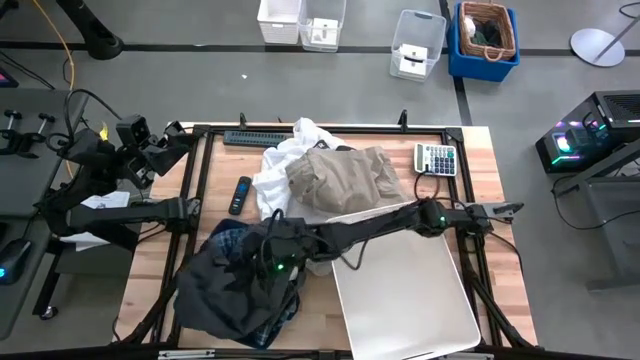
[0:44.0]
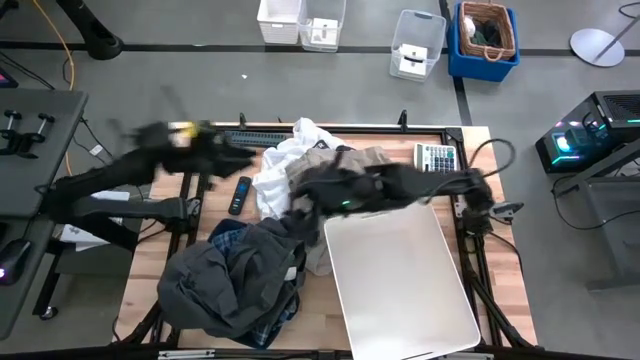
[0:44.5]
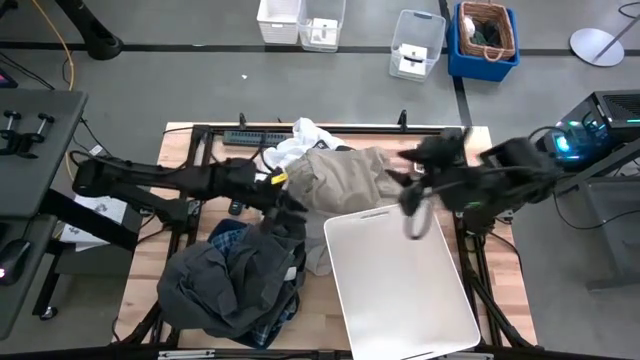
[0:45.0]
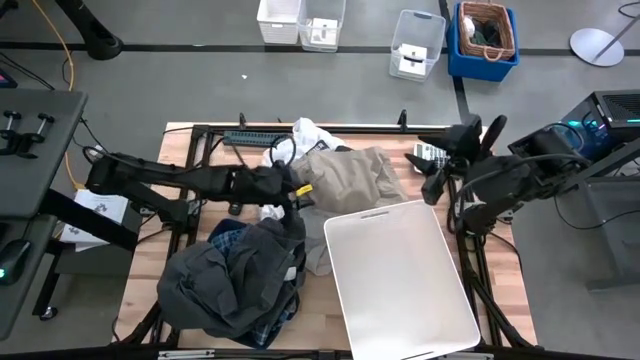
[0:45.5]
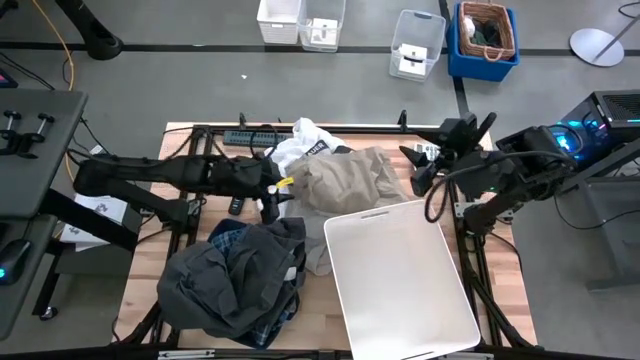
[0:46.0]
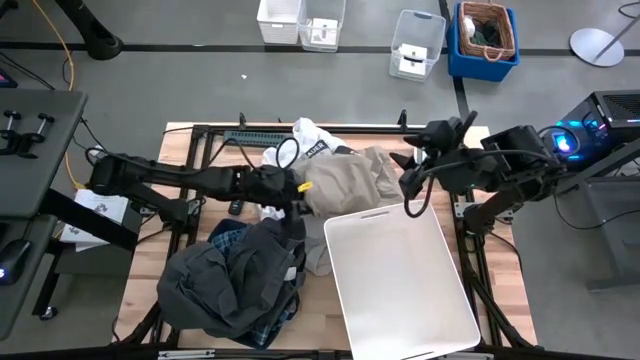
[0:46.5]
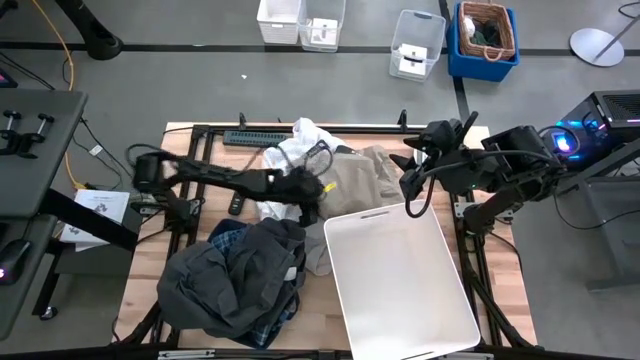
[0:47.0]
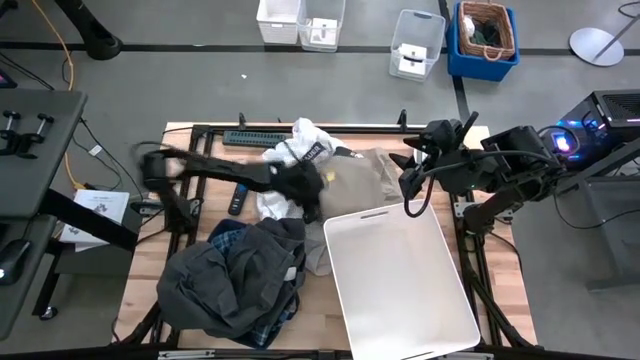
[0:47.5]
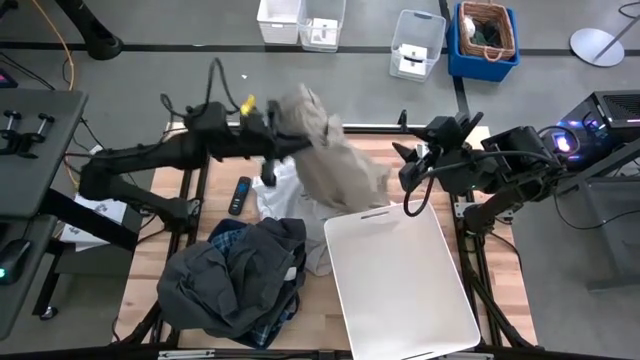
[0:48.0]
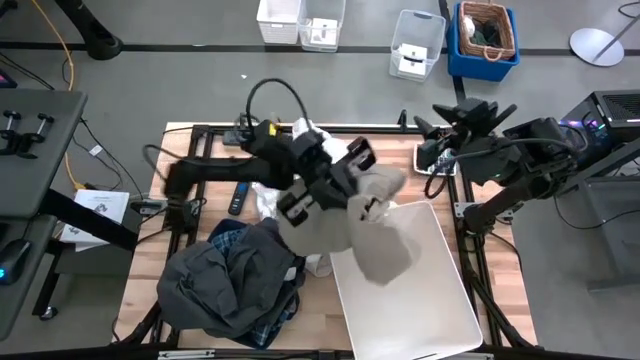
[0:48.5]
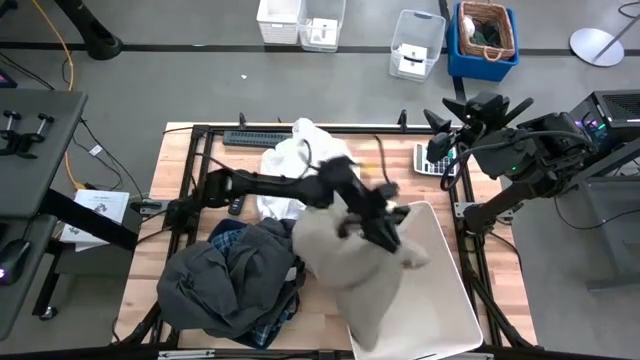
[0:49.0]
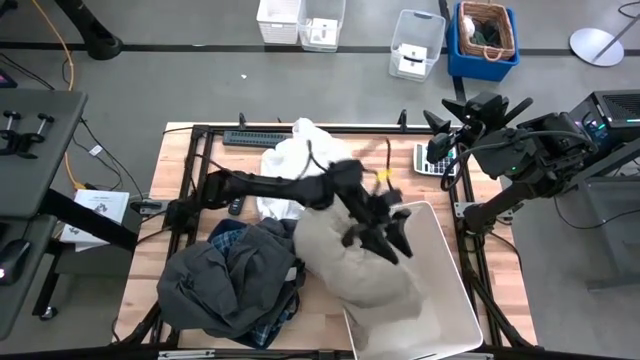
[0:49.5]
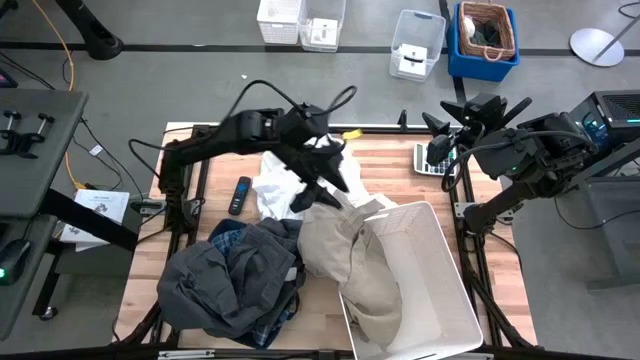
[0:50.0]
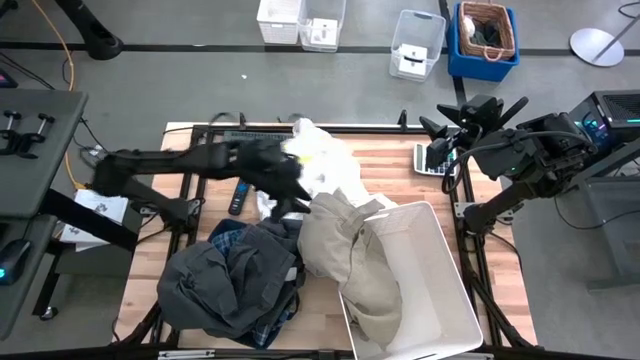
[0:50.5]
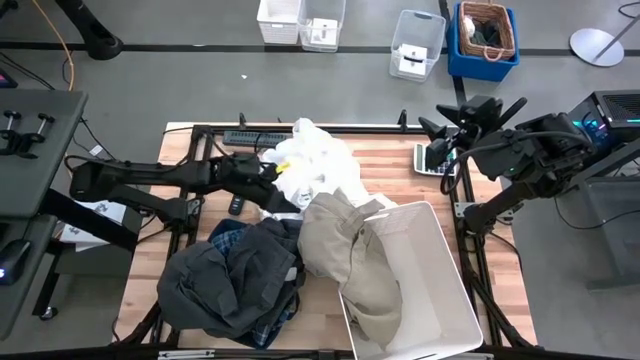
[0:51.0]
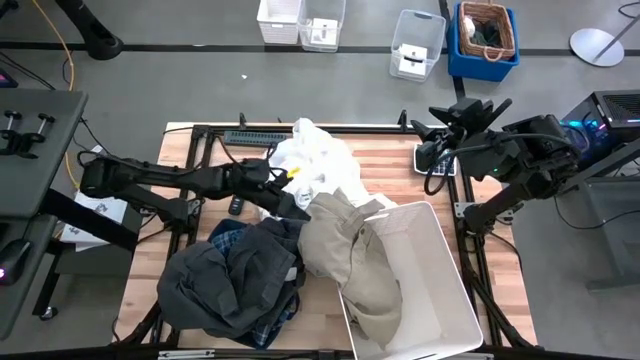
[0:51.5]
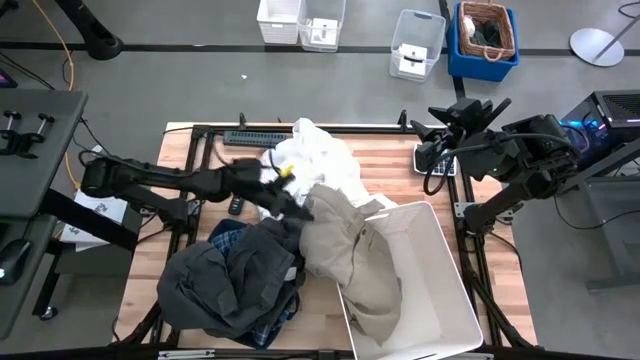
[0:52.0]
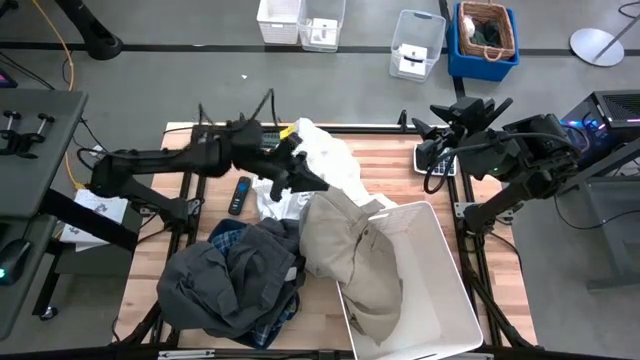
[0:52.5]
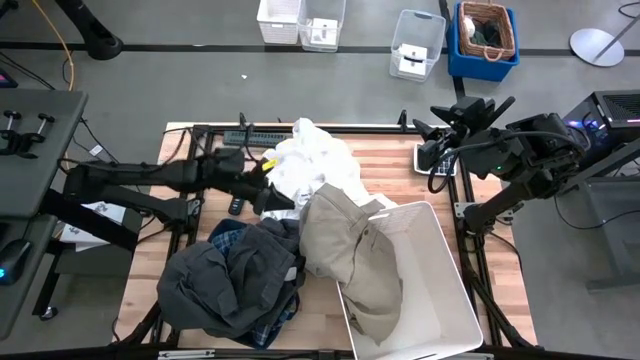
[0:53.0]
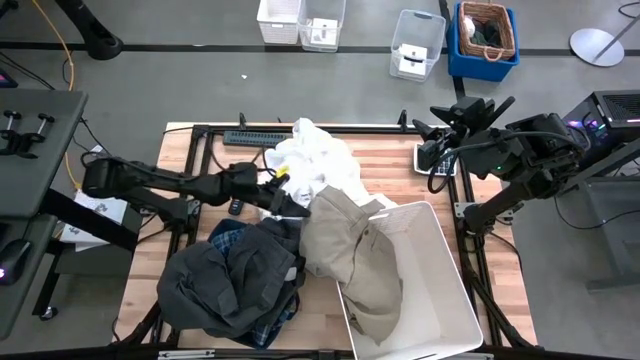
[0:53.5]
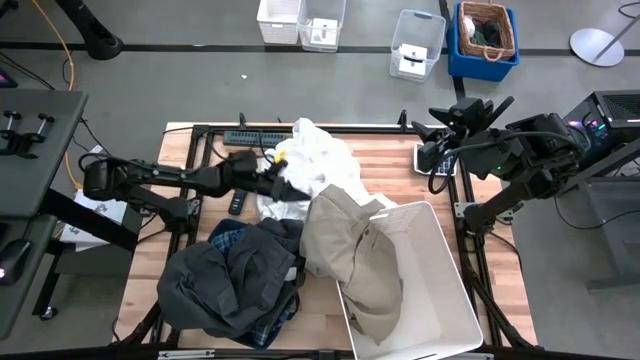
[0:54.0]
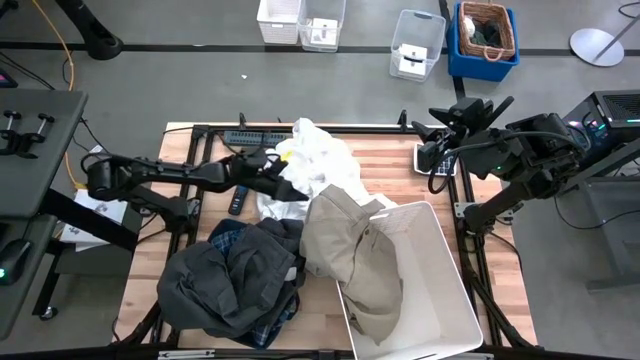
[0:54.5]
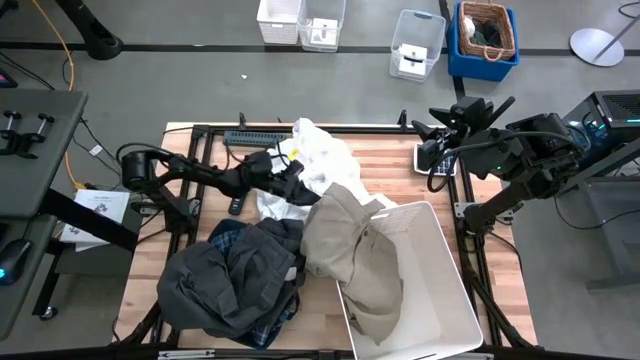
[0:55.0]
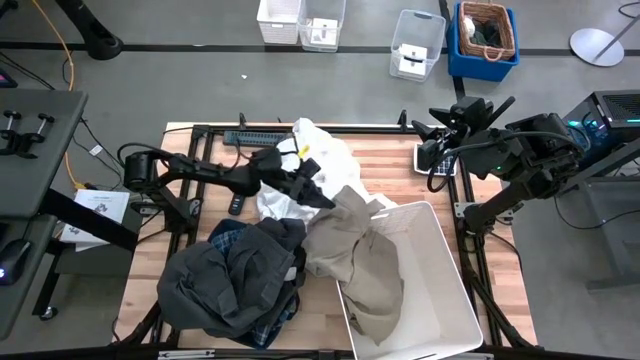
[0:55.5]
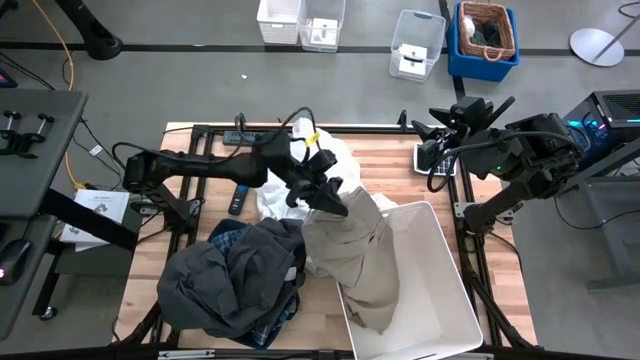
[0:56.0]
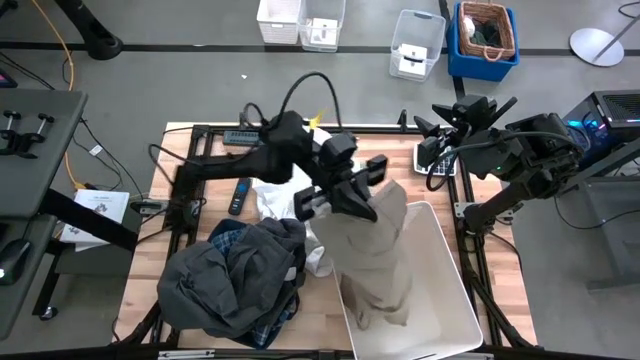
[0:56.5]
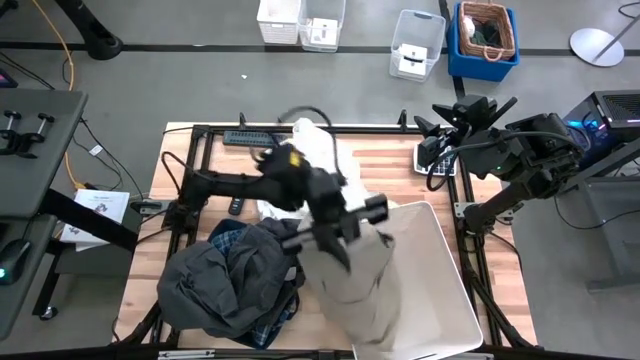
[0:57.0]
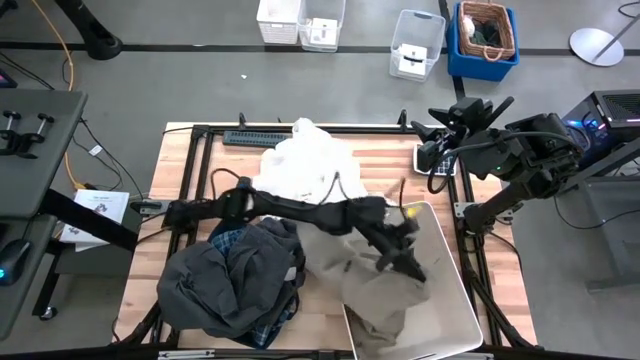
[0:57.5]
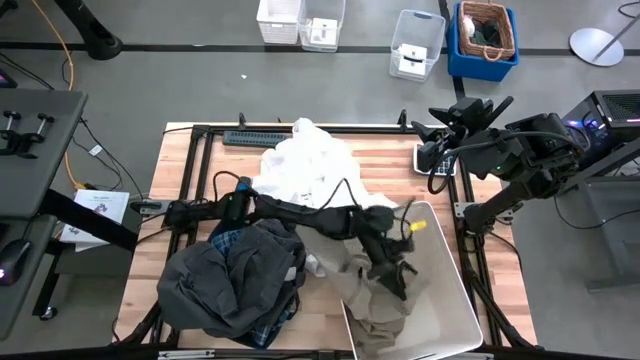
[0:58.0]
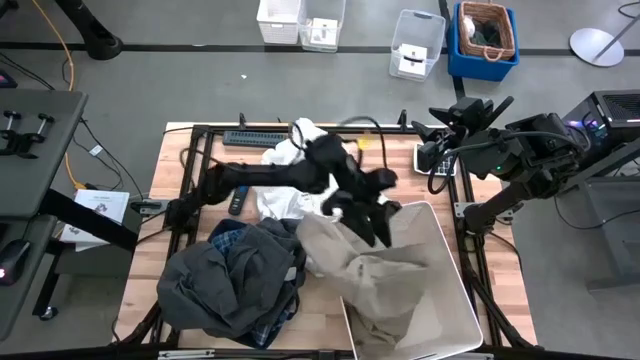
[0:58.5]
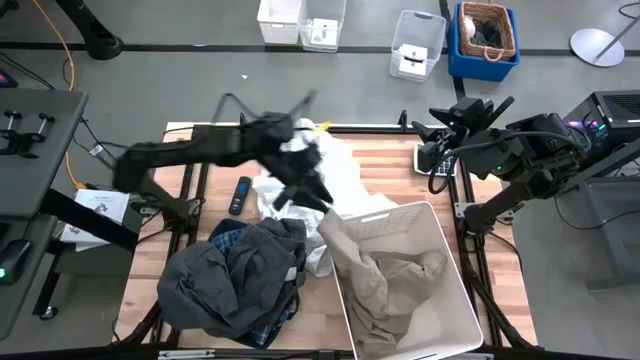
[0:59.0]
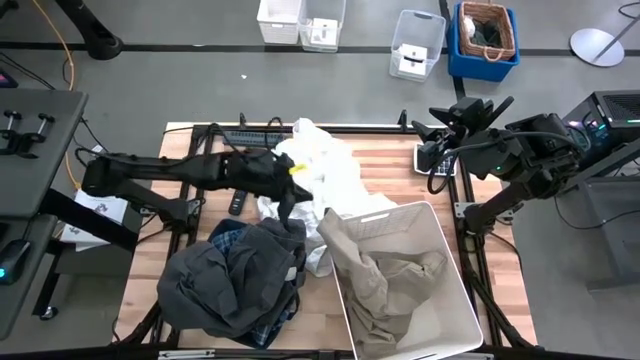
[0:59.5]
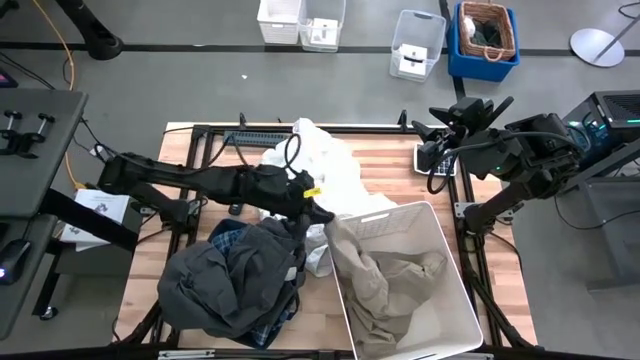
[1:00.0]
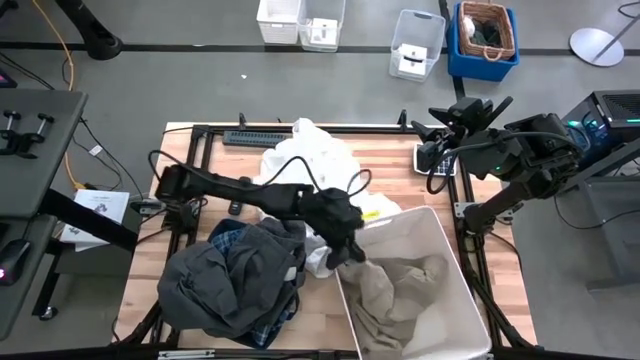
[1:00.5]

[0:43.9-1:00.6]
Task: Sort clothes
Put brown short into the white laundry organizer

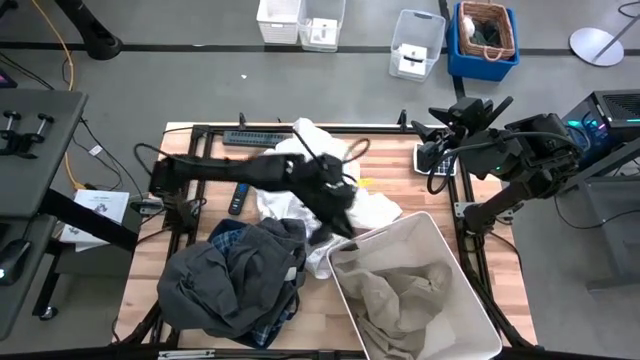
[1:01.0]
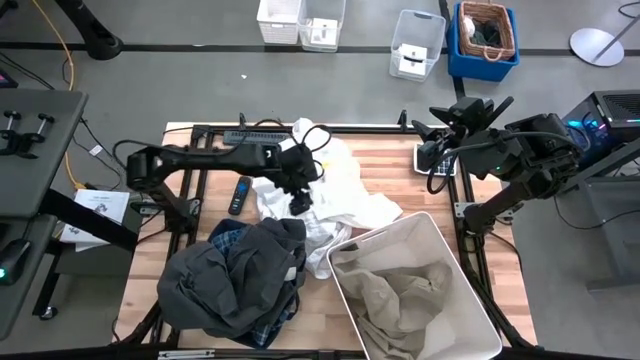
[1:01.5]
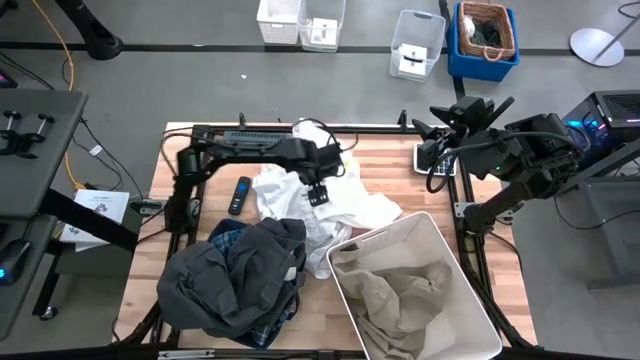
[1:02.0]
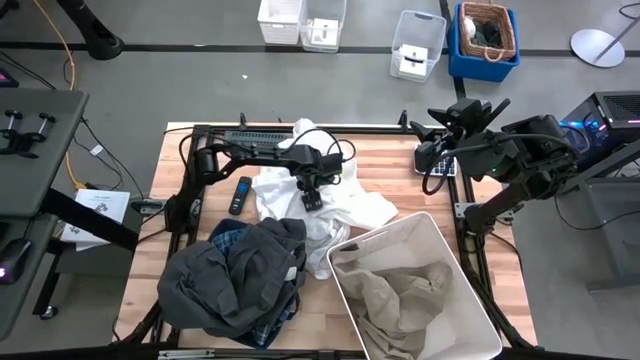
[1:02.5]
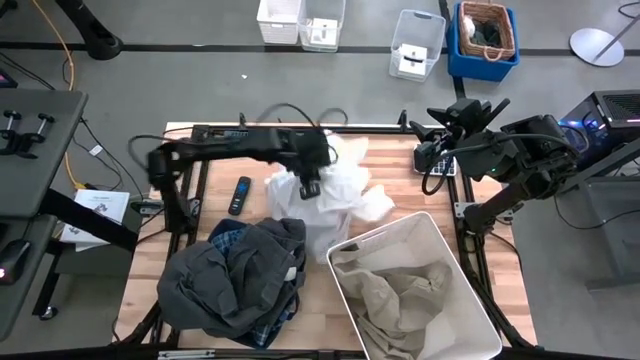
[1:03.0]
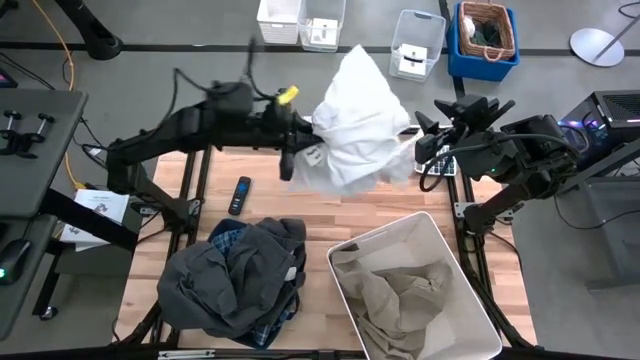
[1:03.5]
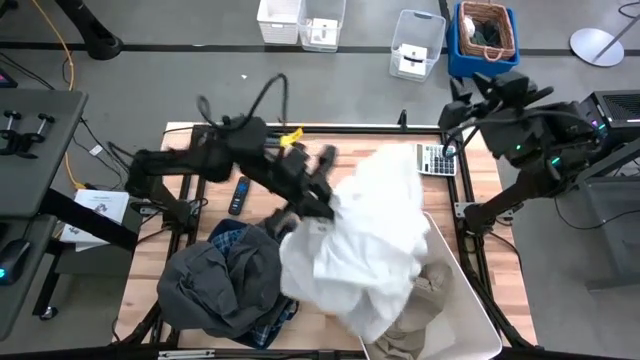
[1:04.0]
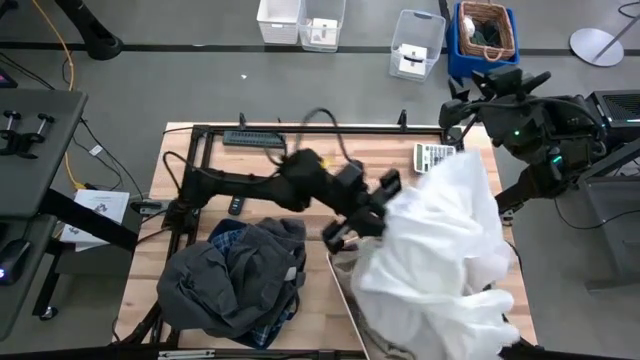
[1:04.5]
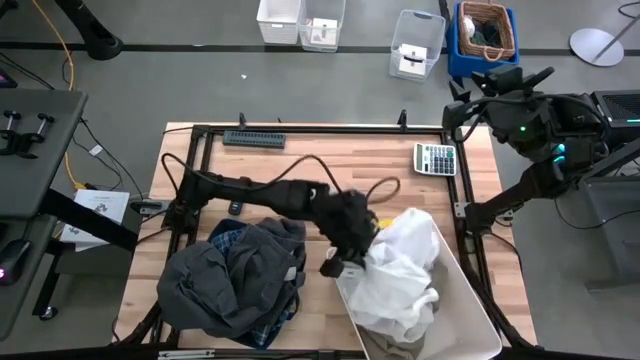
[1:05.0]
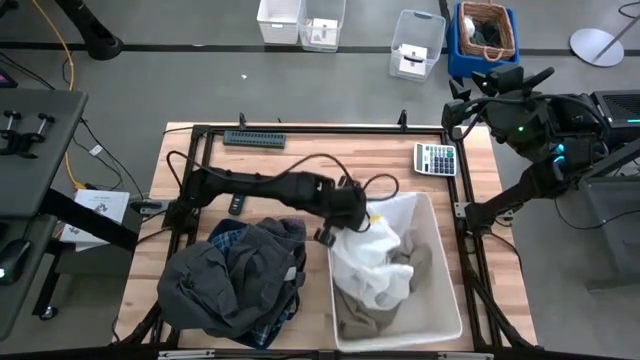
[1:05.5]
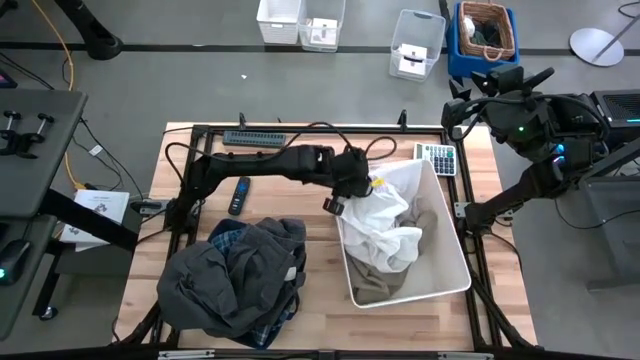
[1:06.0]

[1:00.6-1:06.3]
Put the white shirt into the white laundry organizer
